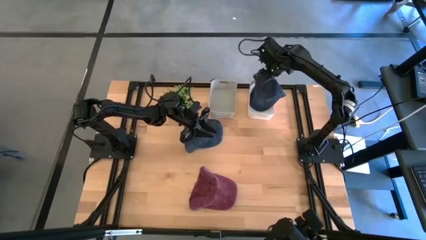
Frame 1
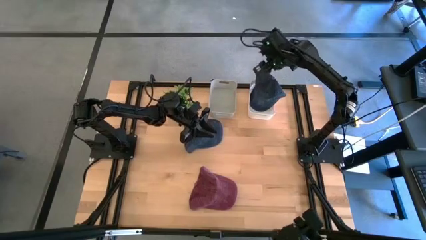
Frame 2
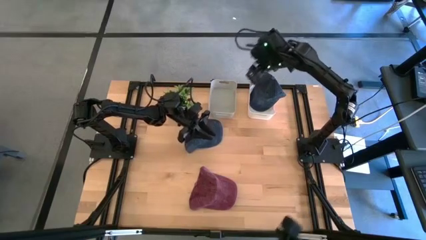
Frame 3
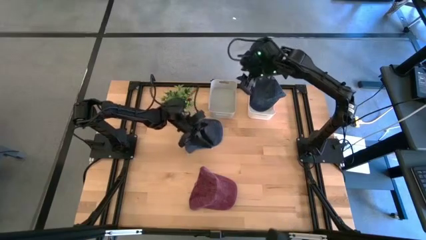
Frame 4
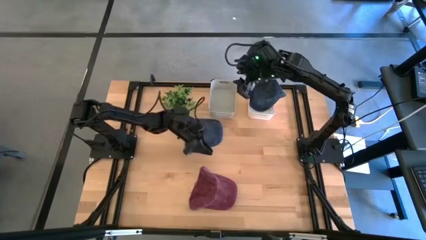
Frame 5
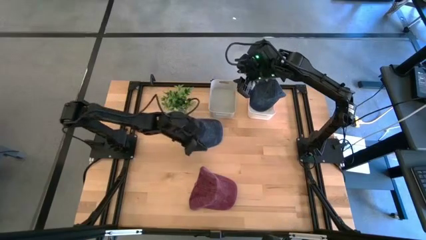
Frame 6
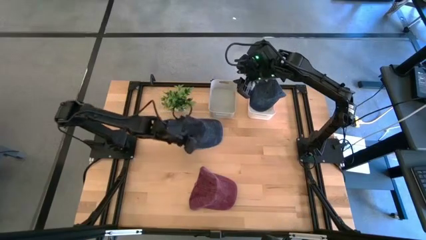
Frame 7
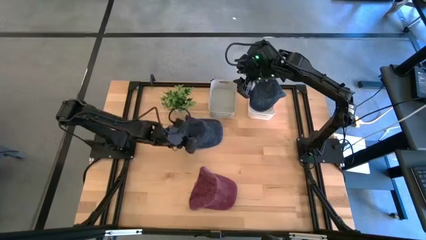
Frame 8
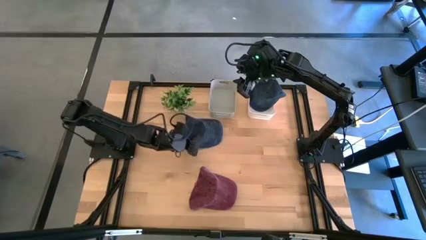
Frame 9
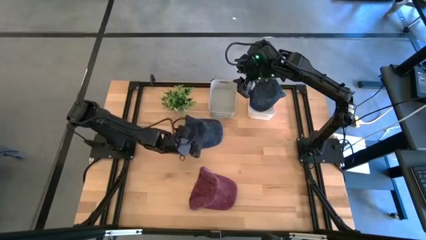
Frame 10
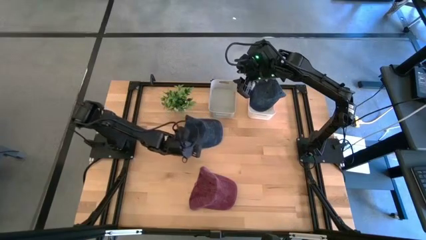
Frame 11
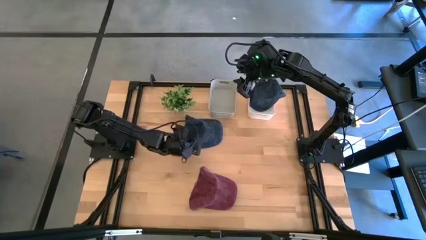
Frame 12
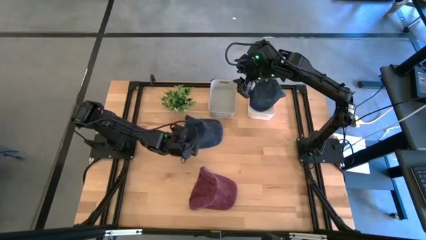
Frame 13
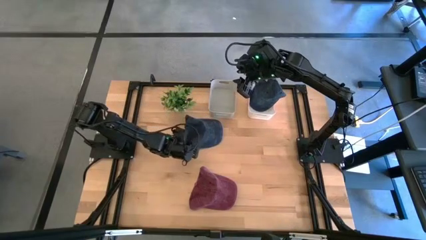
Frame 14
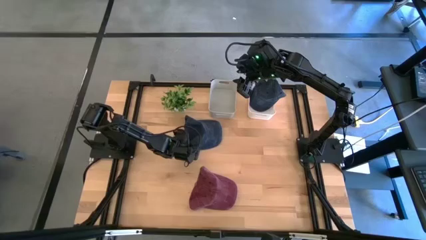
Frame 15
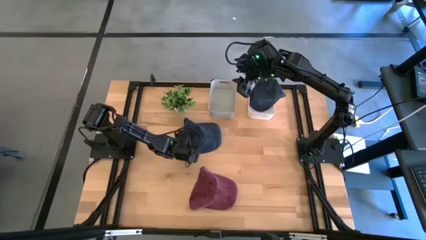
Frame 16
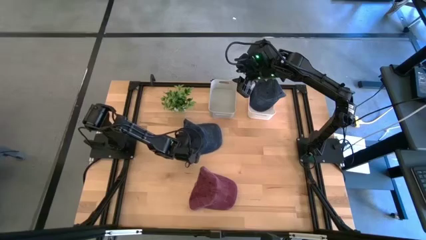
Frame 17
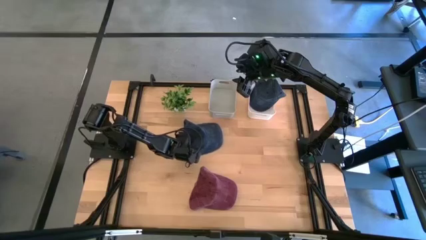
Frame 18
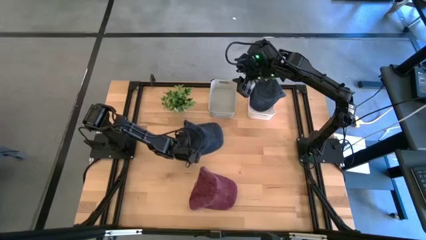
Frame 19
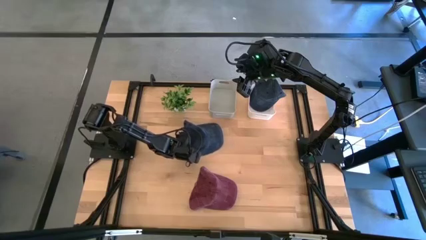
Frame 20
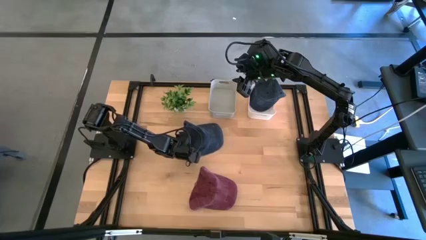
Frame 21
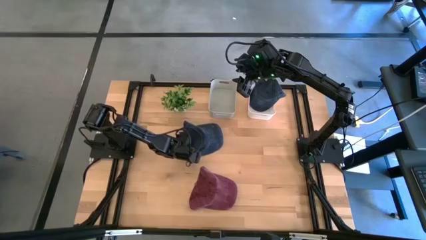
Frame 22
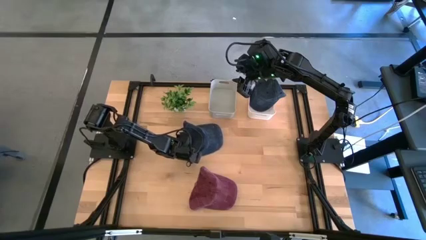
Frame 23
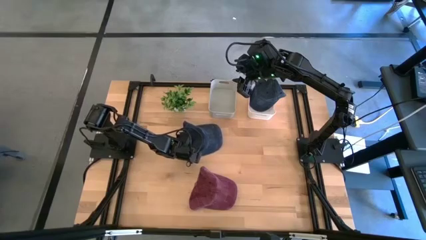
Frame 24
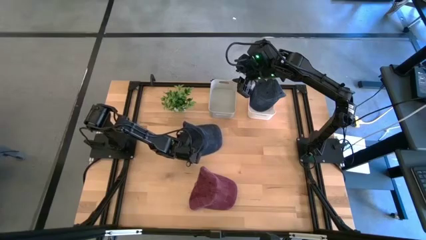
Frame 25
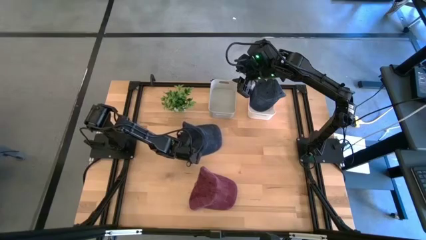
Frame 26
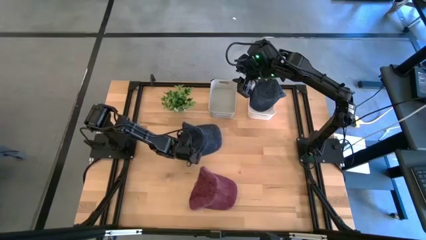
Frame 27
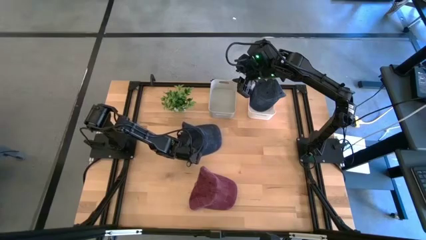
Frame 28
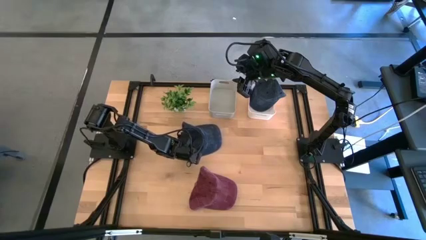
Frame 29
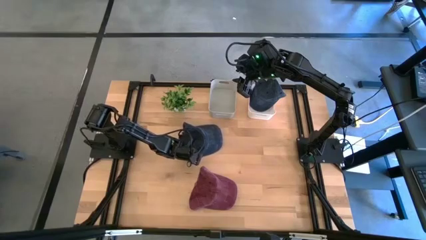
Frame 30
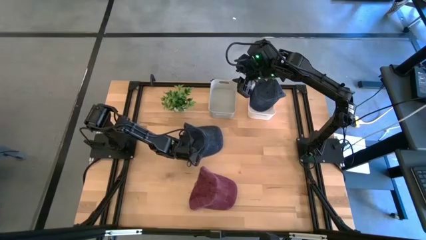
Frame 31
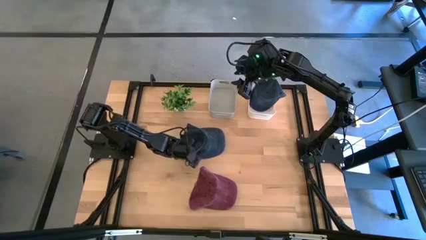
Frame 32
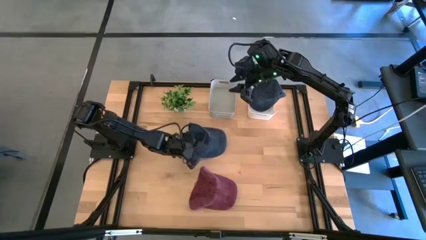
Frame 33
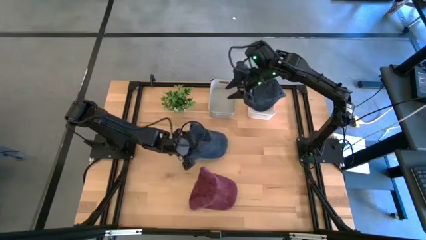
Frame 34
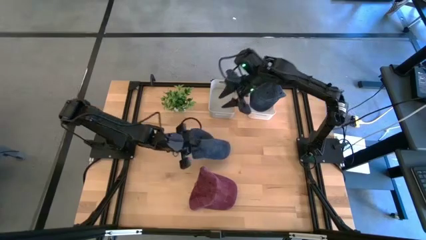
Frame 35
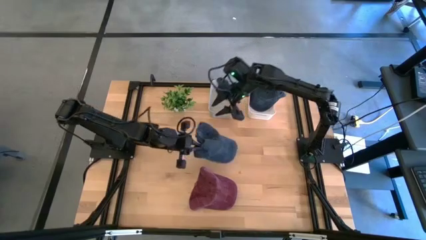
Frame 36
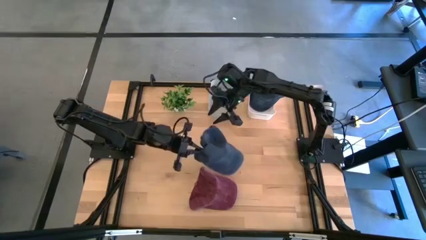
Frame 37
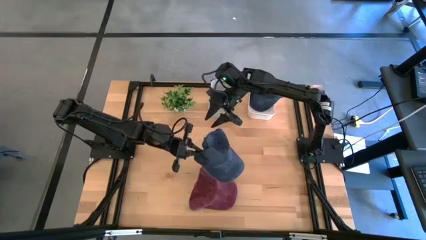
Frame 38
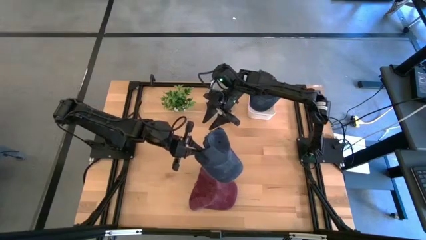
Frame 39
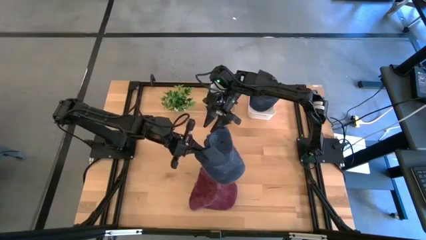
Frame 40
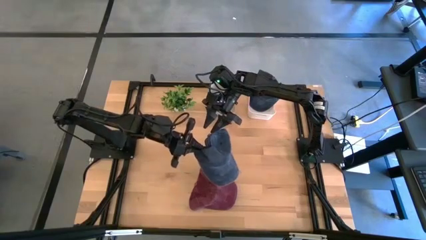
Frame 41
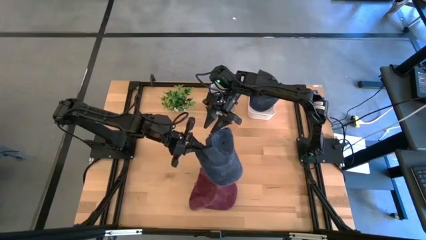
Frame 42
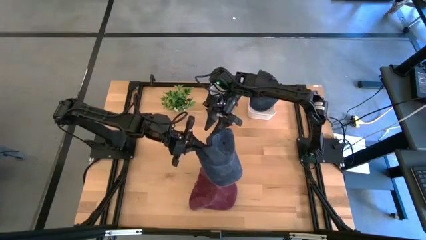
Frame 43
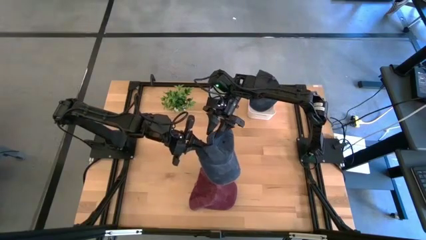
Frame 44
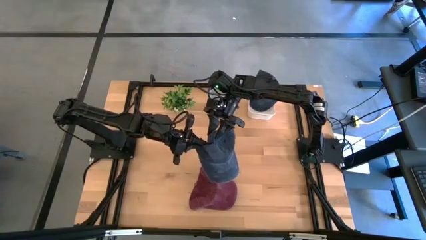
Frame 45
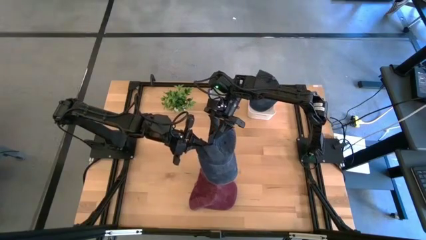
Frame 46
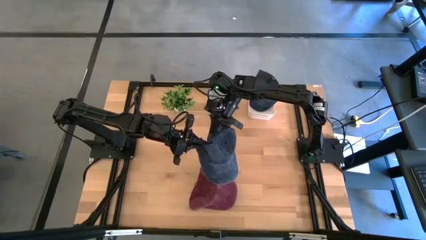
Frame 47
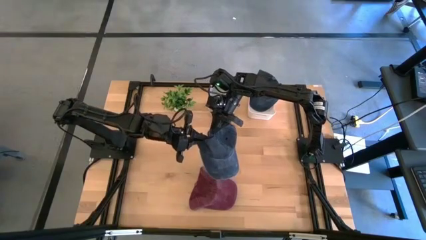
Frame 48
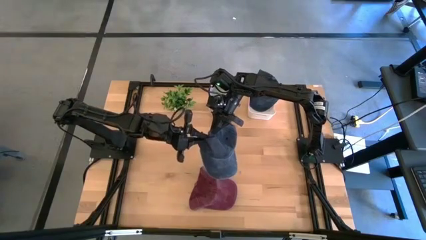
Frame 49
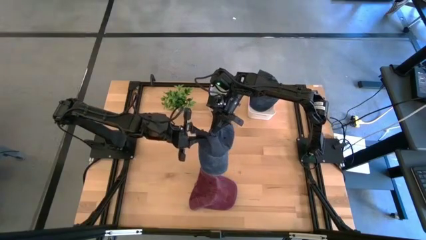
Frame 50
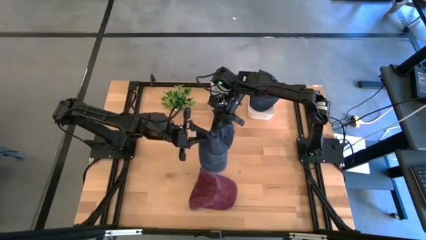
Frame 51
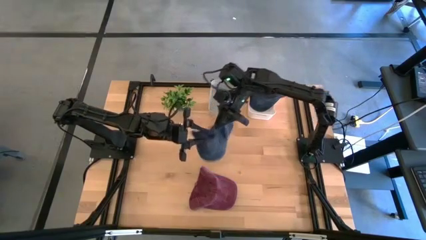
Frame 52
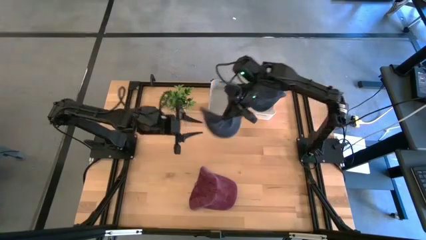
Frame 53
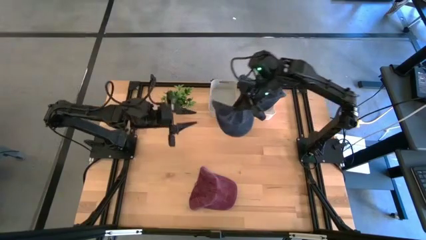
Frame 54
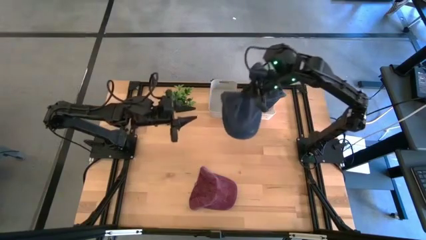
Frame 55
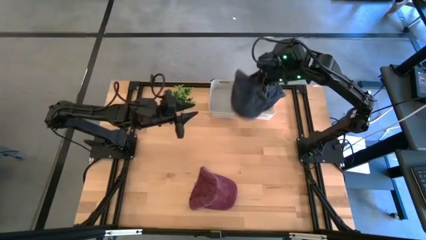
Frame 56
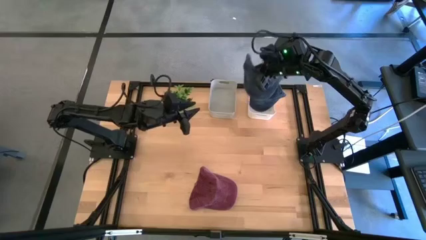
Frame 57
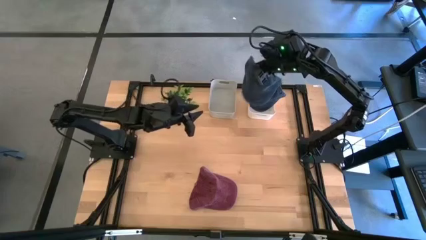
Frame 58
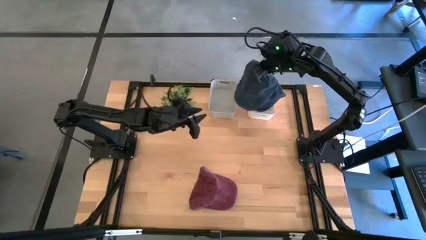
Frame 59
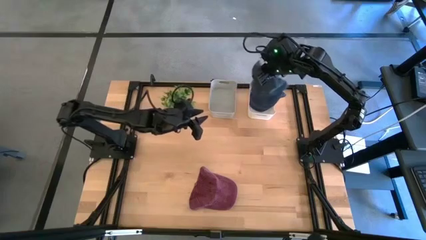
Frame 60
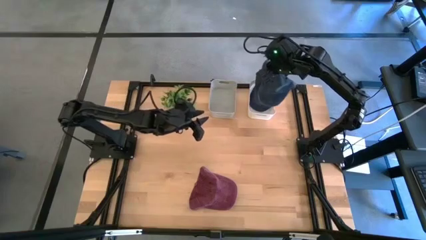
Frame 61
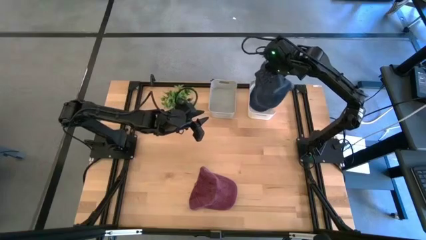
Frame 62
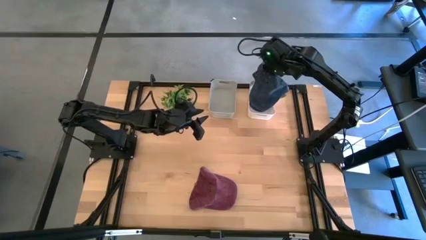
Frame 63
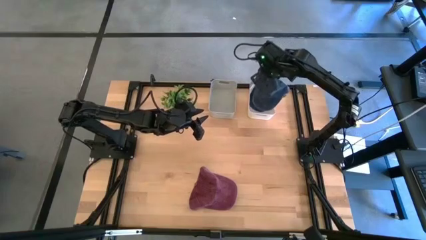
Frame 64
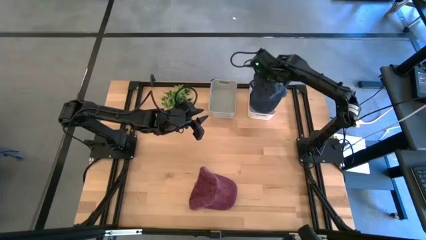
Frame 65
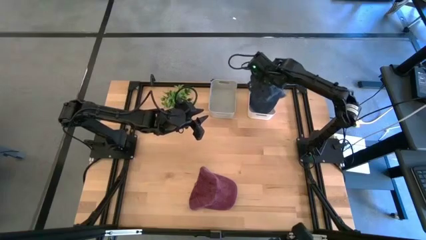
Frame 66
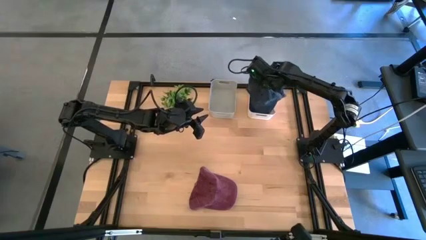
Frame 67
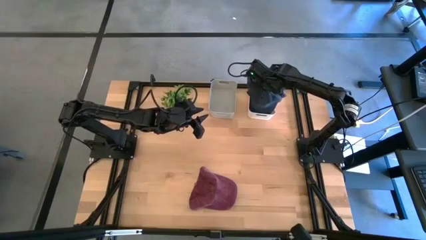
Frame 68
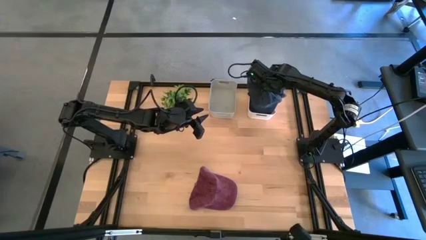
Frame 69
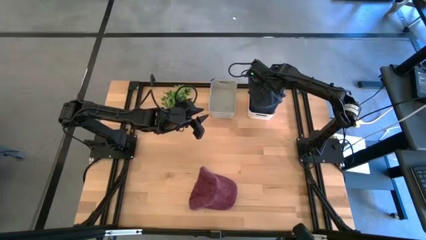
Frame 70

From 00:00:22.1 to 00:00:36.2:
Task: Pick & Place hat
Put the blue cap into the white bin
